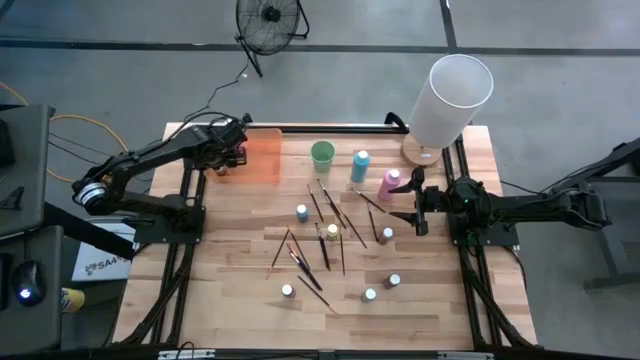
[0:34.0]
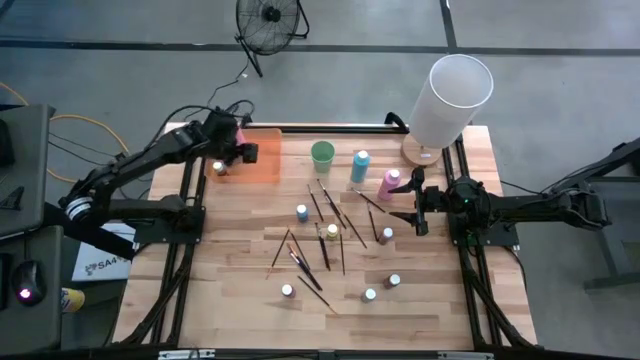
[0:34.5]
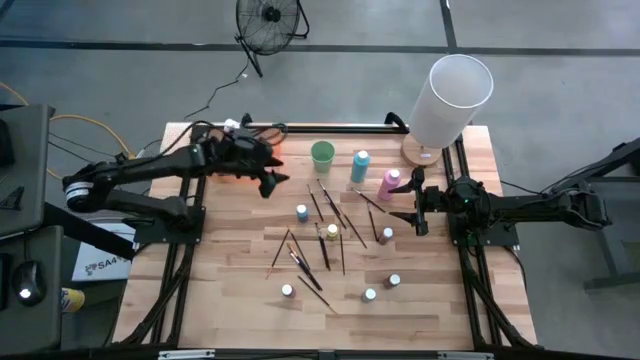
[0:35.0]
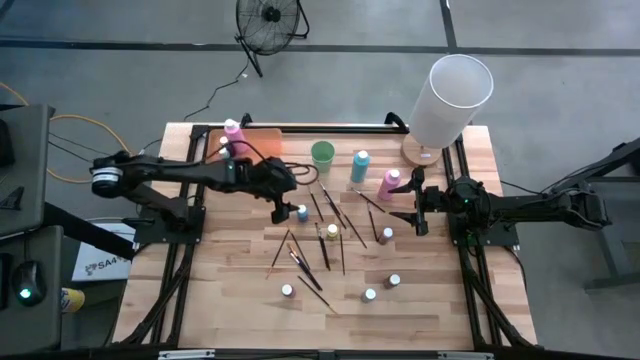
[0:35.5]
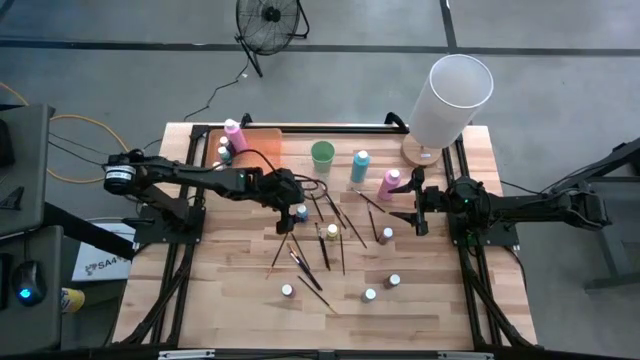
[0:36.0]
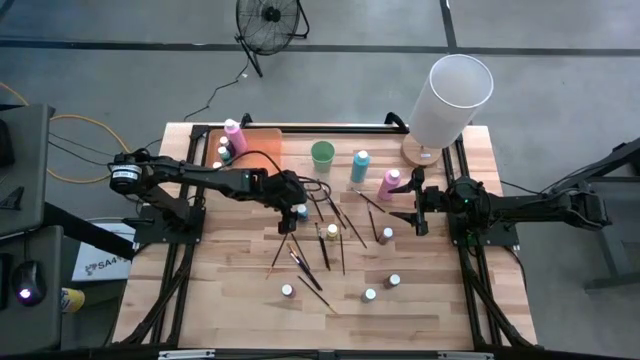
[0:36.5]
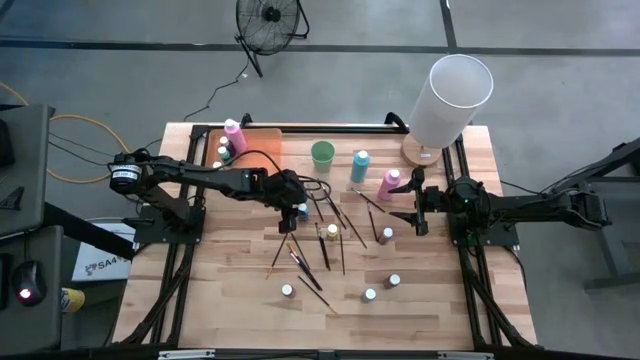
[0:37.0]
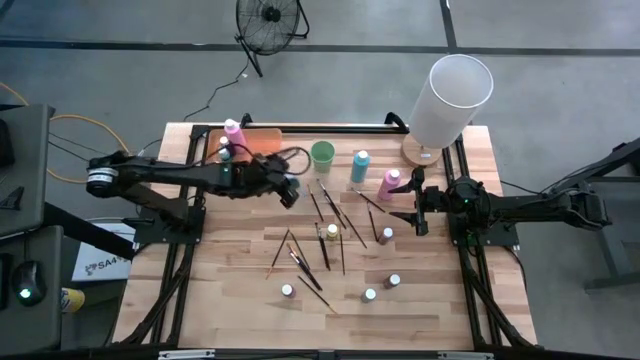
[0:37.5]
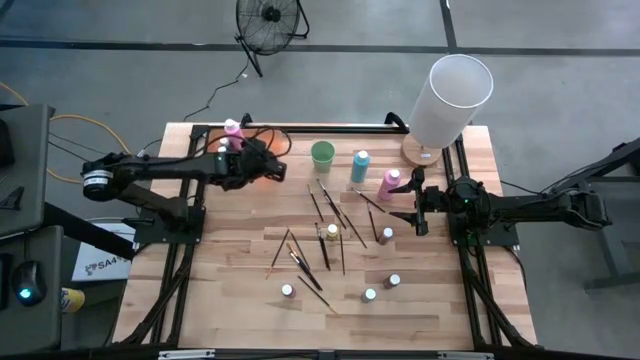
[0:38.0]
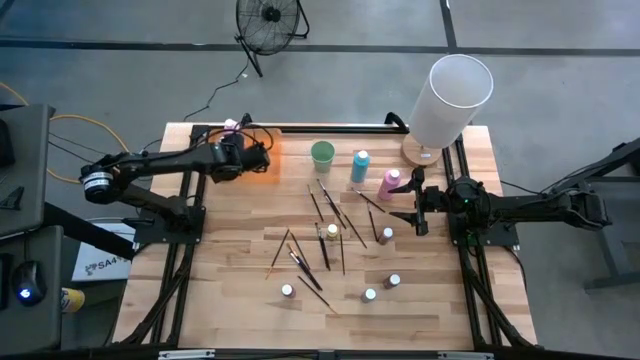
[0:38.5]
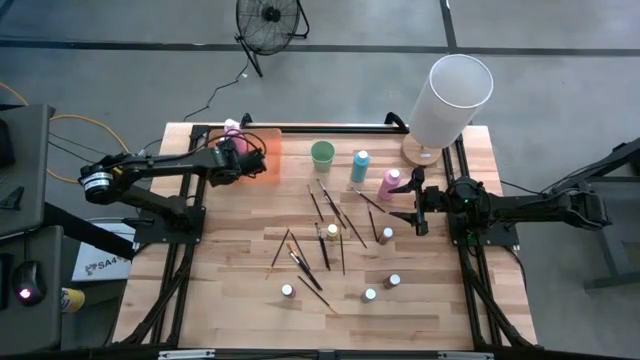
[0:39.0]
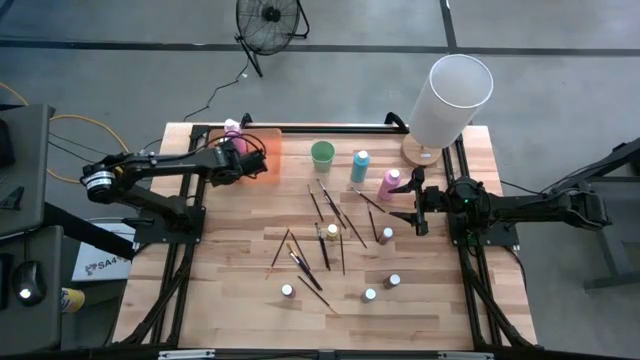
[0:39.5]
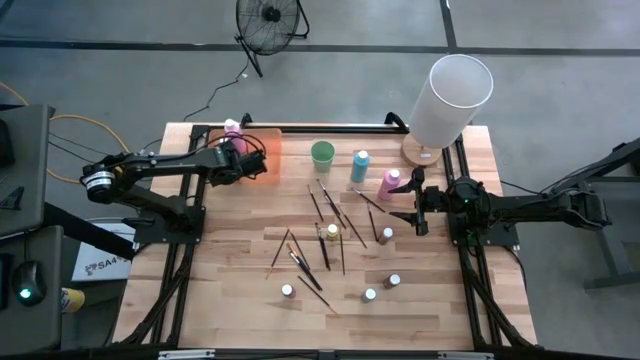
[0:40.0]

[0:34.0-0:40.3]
Task: Pick & Place Paint Supplies
Put the light blue paint bottle into the orange bin

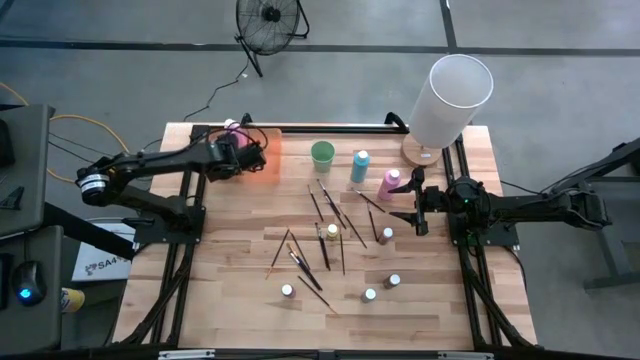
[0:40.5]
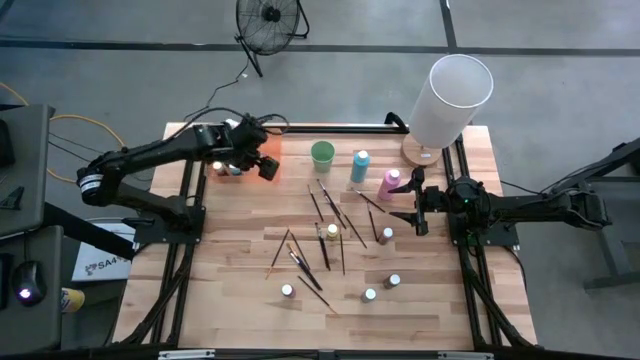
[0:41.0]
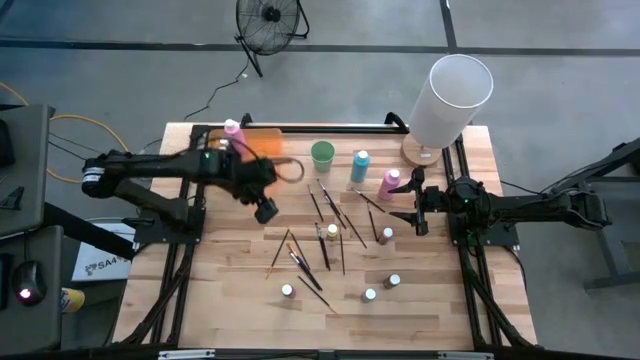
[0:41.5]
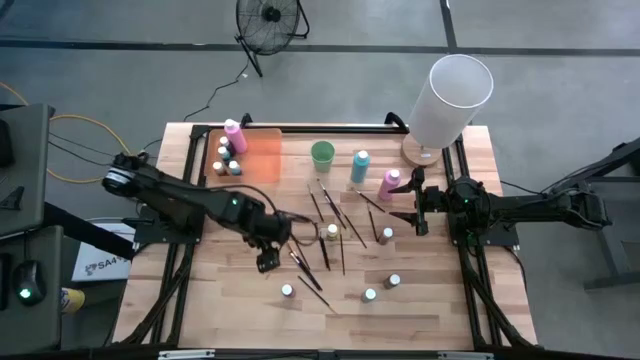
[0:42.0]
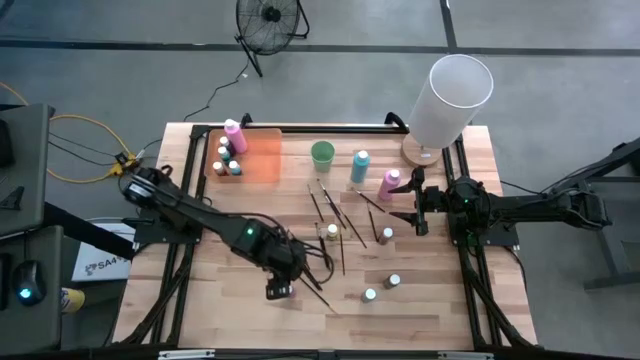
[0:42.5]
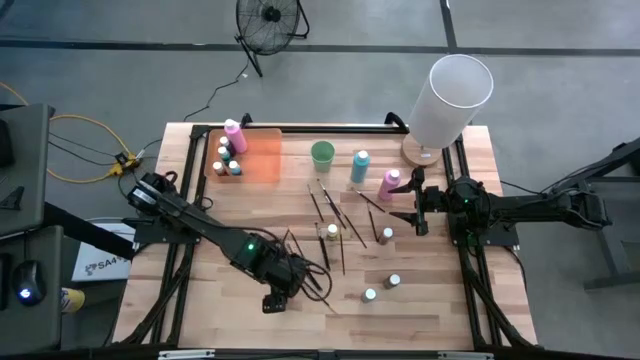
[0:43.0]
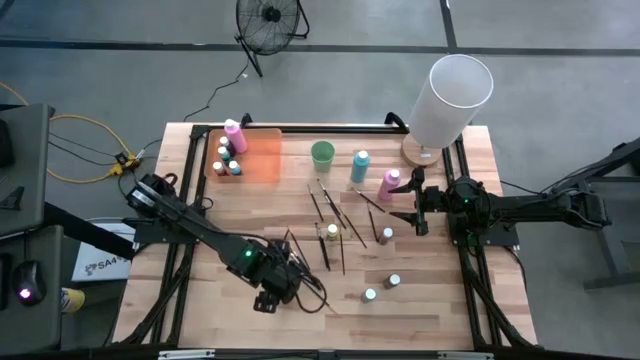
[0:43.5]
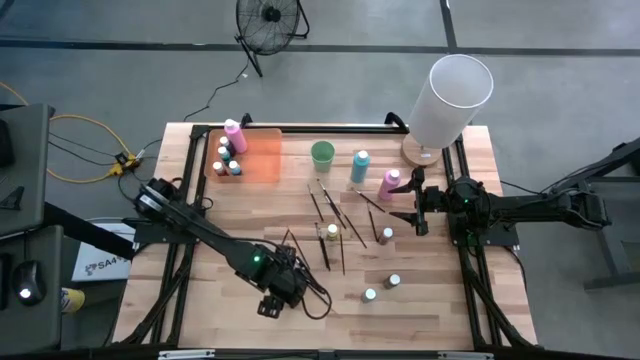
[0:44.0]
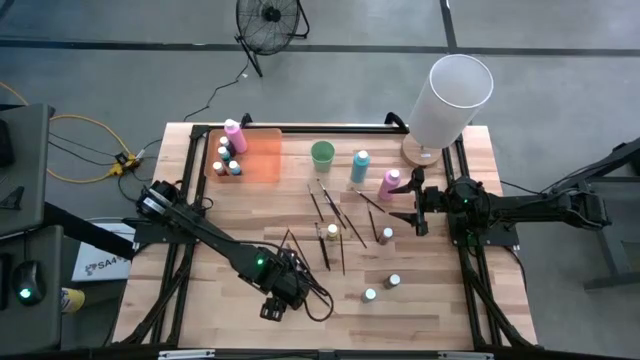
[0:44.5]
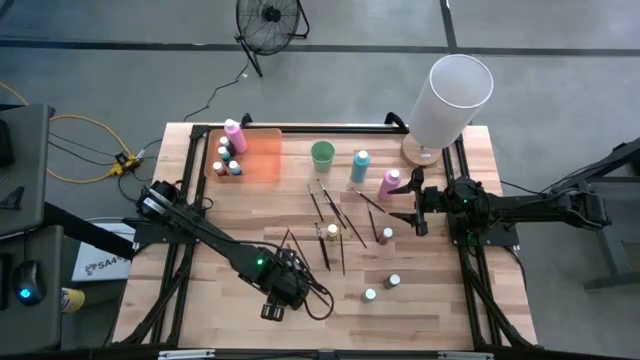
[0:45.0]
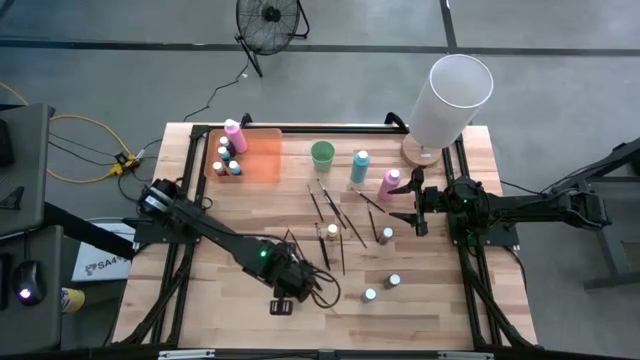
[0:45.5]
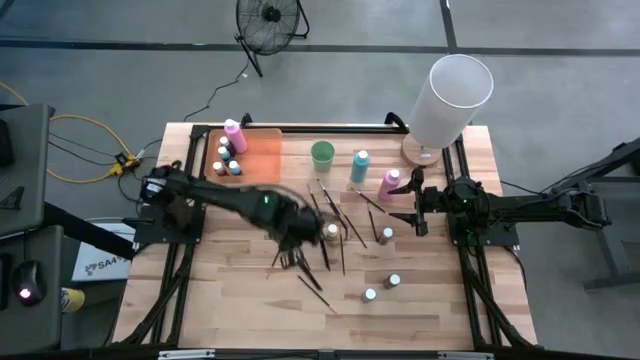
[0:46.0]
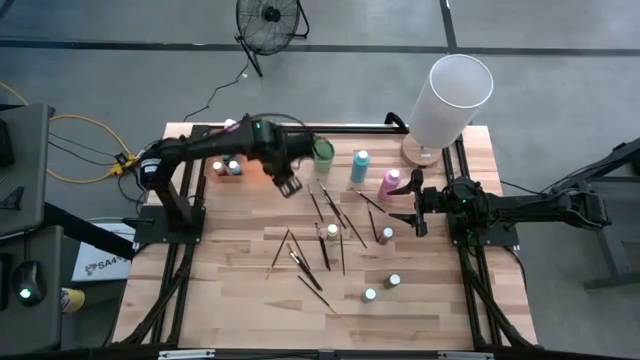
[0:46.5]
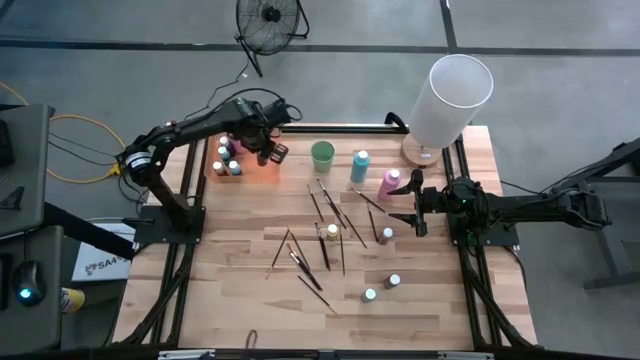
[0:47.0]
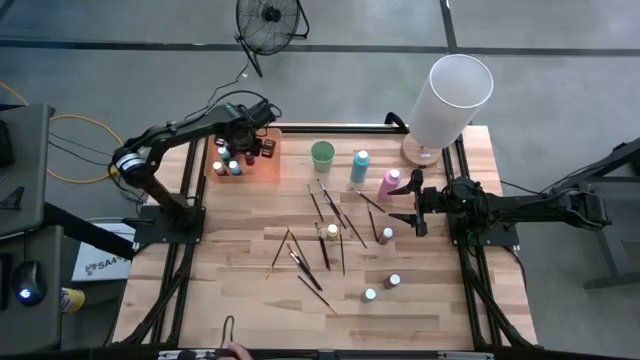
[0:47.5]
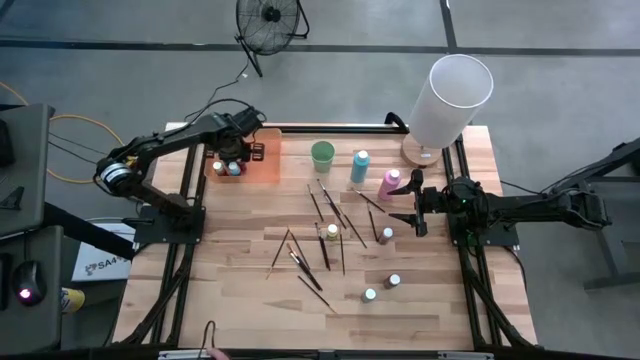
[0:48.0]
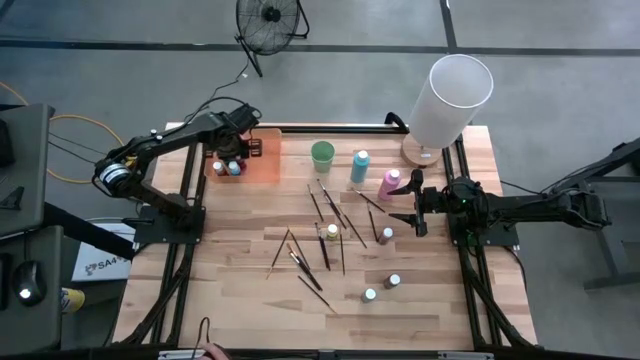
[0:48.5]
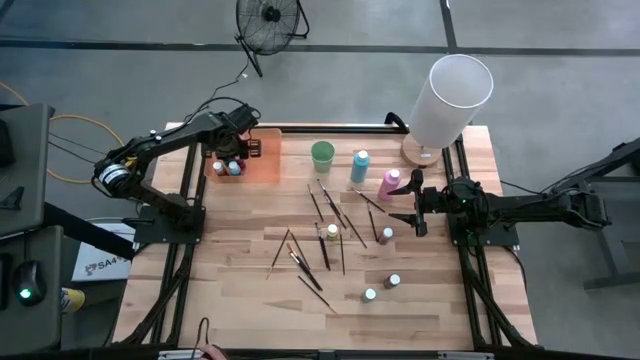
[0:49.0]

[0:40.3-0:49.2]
Put the violet paint bottle into the orange bin

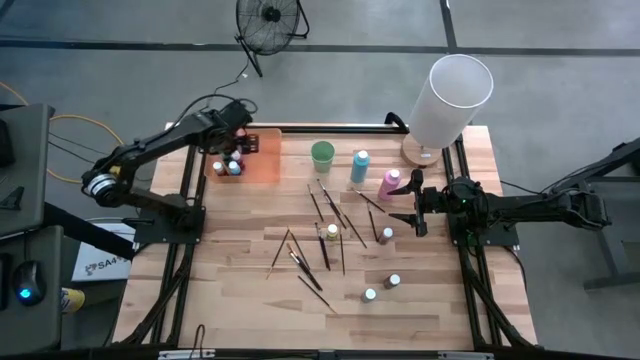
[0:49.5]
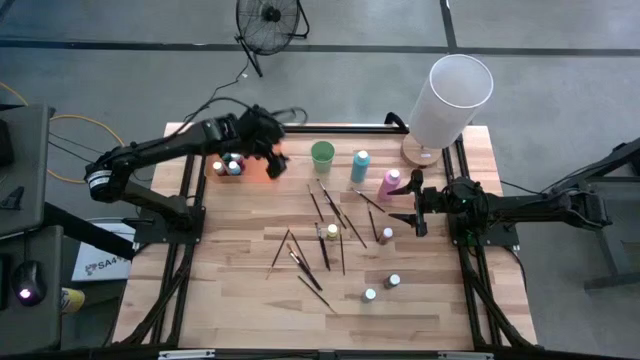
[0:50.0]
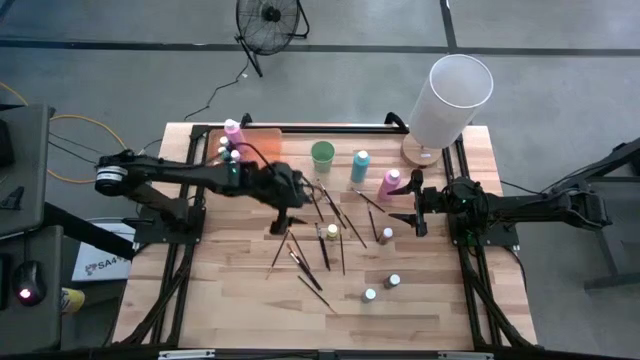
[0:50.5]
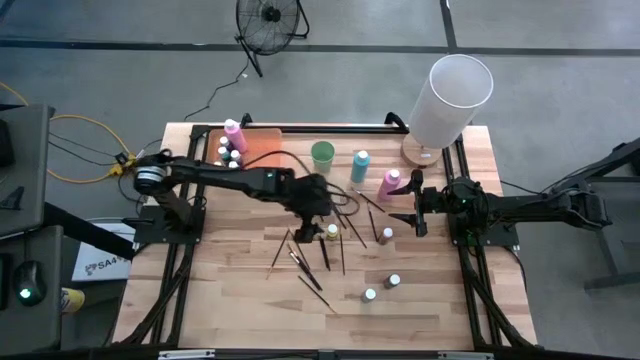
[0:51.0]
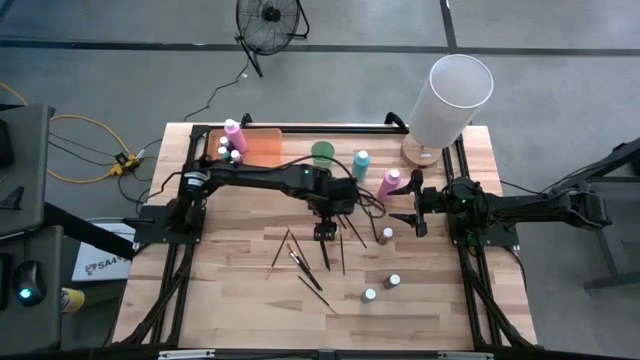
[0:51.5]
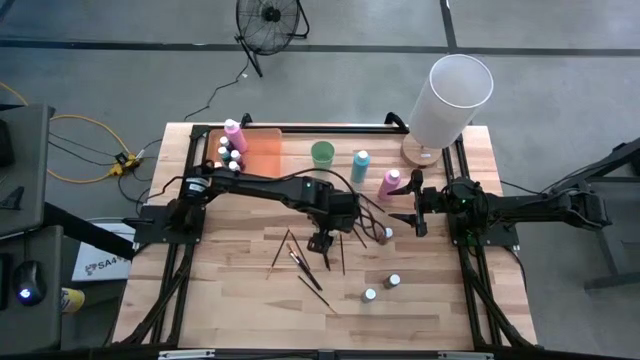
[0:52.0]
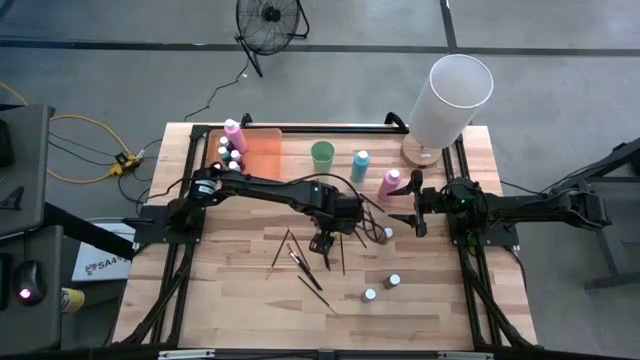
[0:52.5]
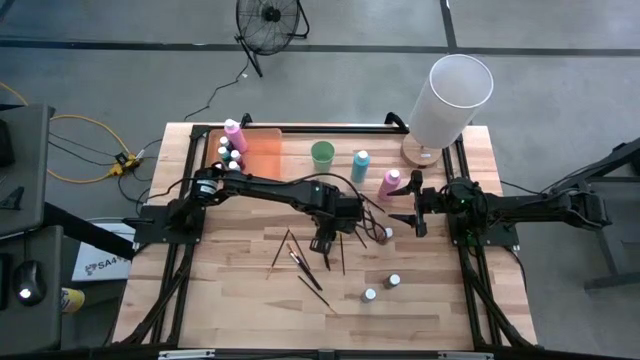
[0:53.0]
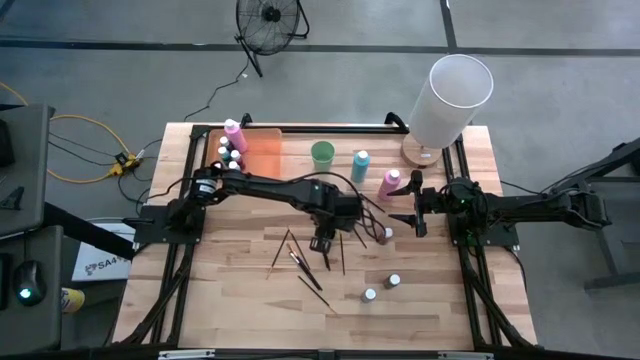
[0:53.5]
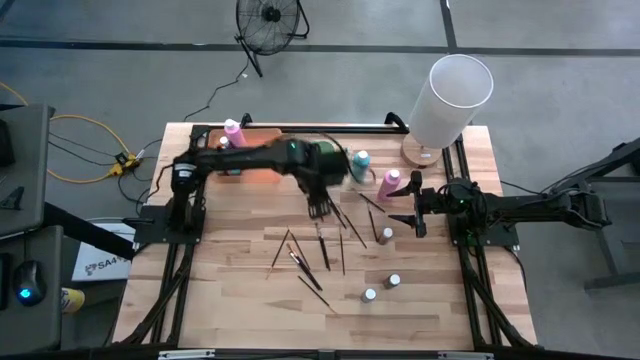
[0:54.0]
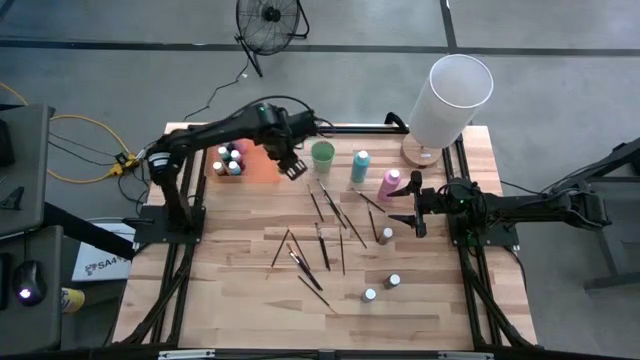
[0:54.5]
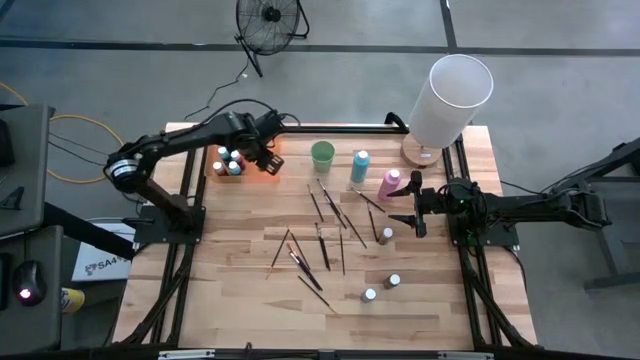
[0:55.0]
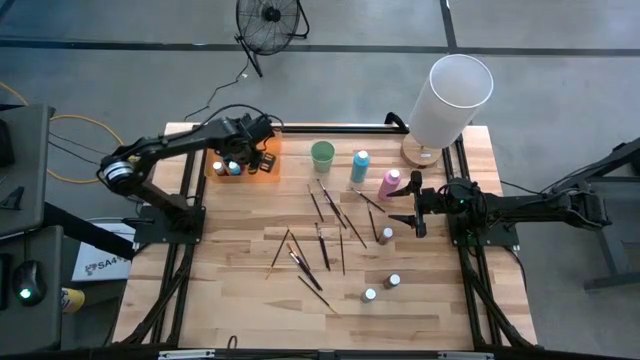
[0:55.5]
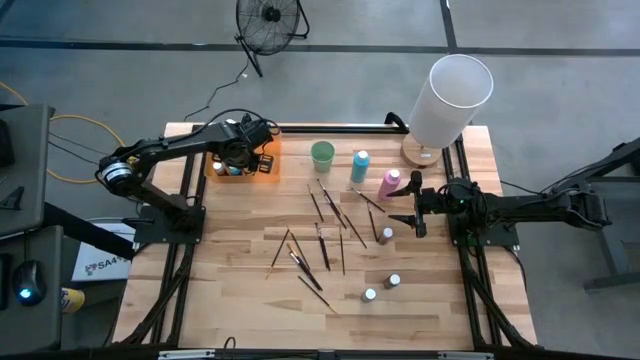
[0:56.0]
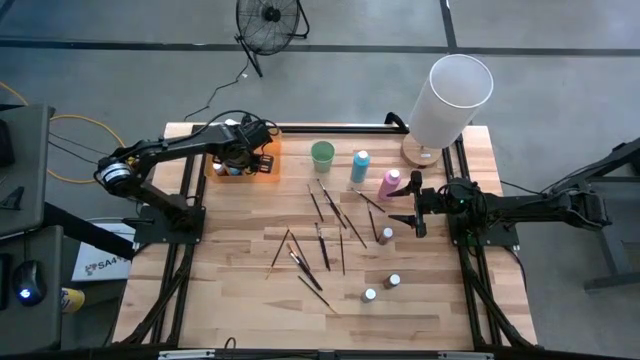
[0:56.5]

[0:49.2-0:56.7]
Put the yellow paint bottle into the orange bin
